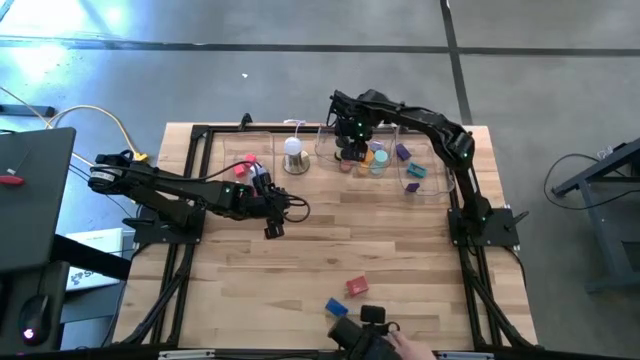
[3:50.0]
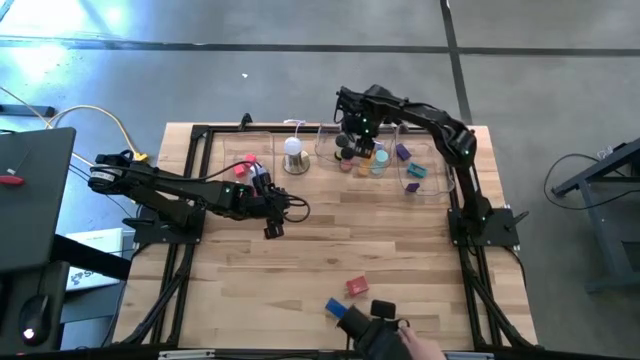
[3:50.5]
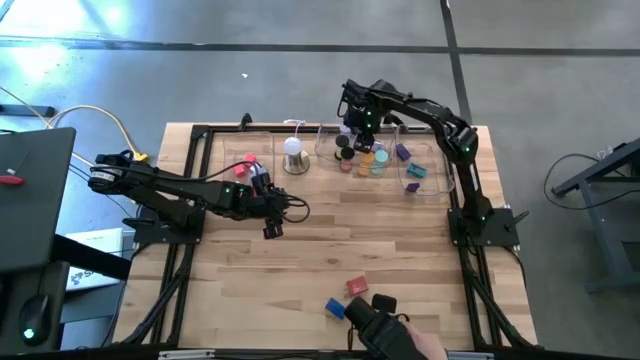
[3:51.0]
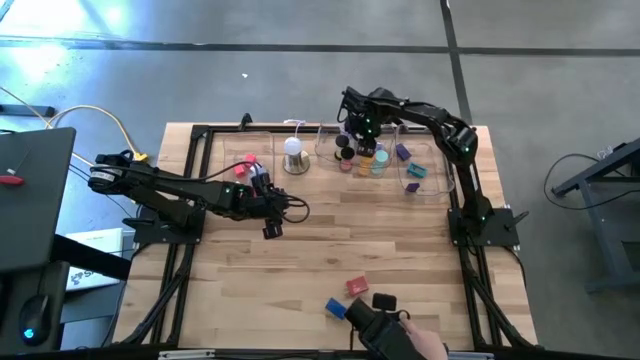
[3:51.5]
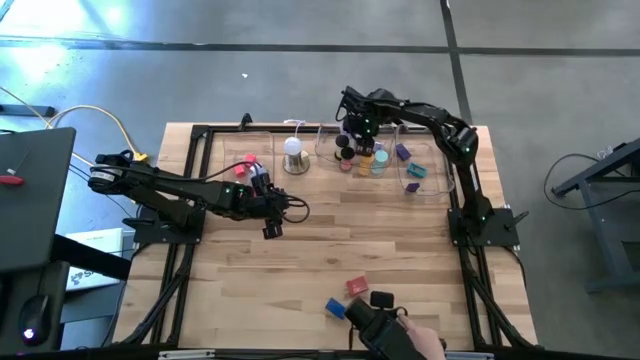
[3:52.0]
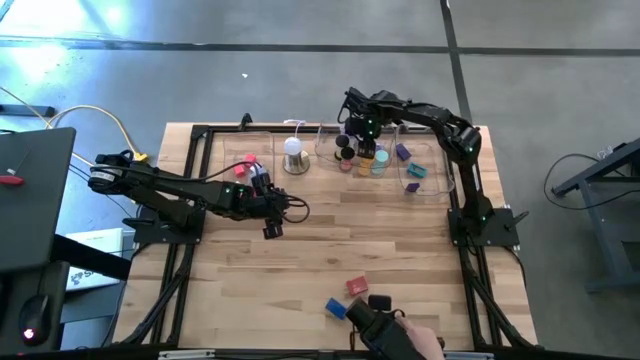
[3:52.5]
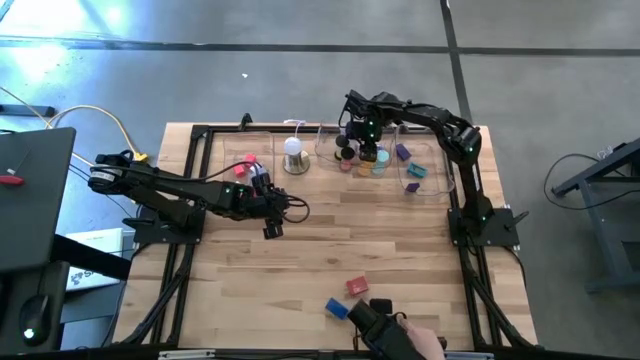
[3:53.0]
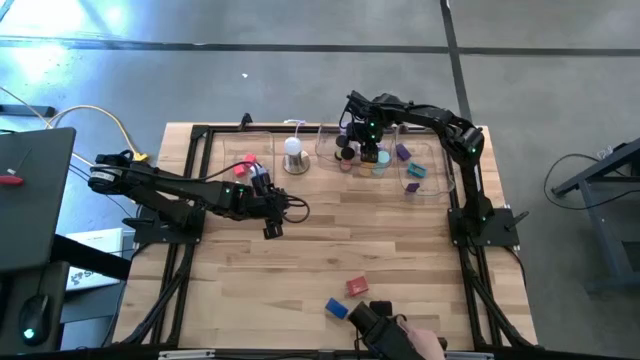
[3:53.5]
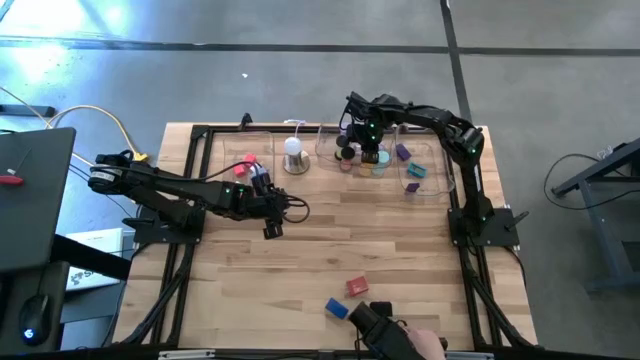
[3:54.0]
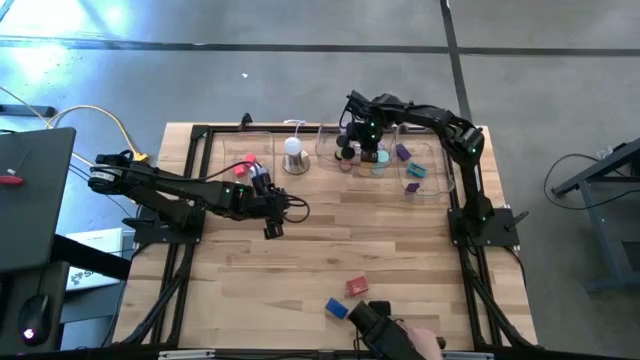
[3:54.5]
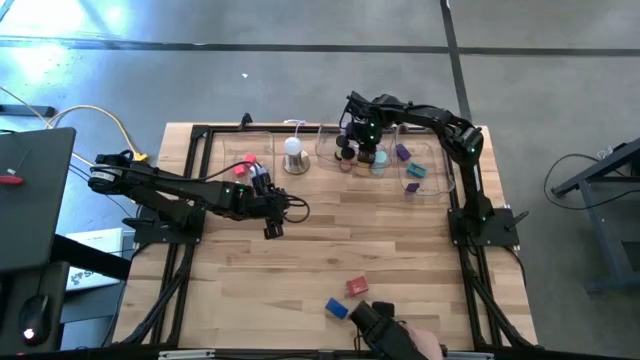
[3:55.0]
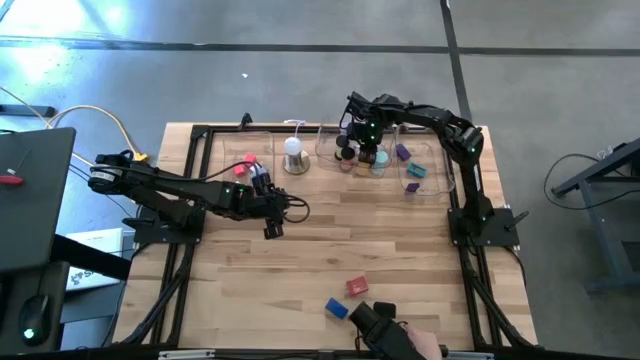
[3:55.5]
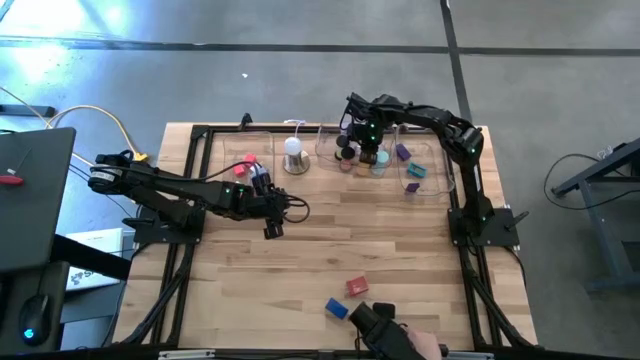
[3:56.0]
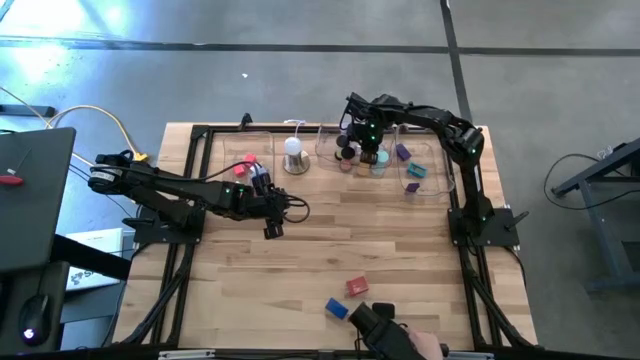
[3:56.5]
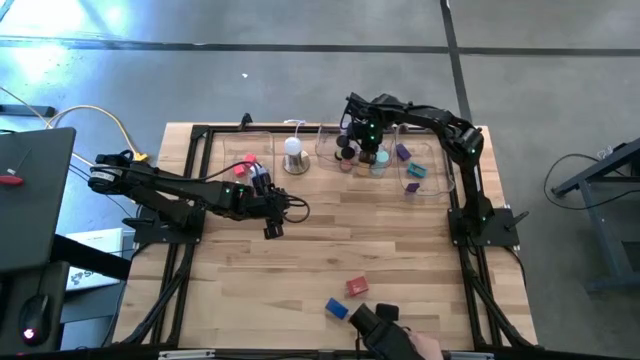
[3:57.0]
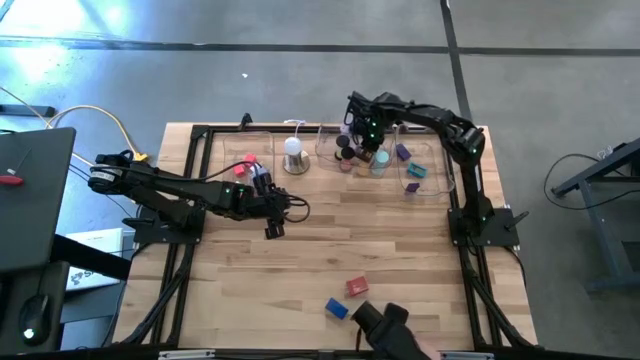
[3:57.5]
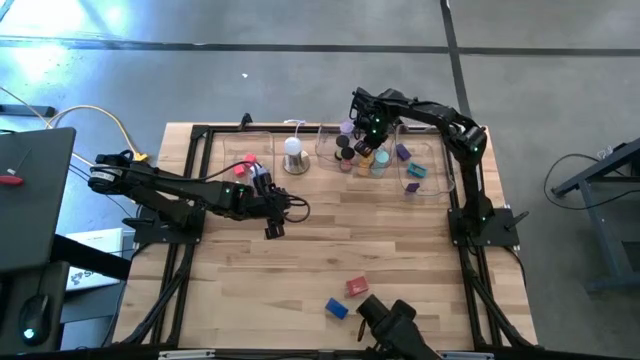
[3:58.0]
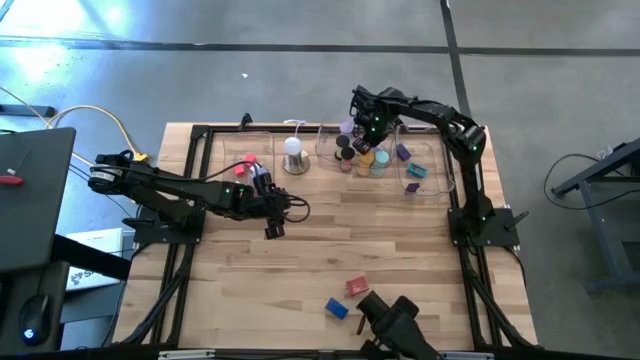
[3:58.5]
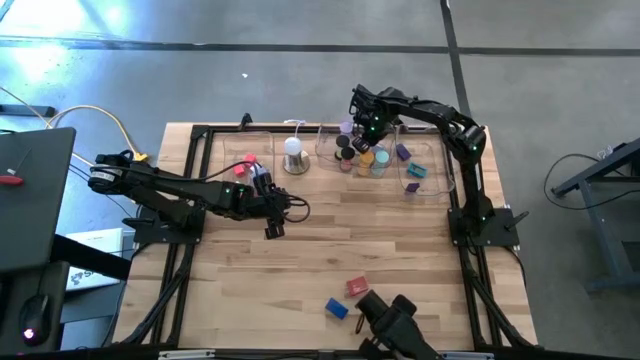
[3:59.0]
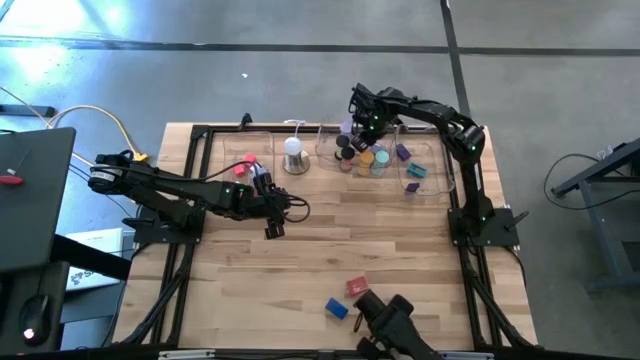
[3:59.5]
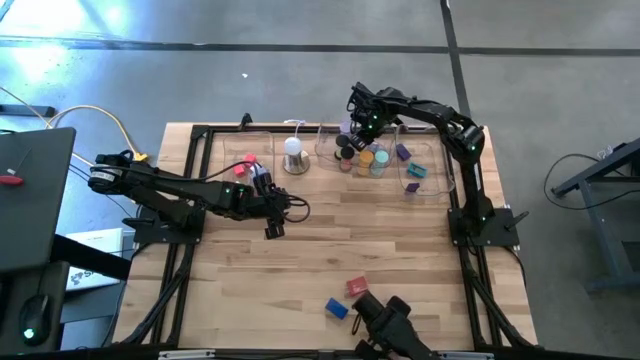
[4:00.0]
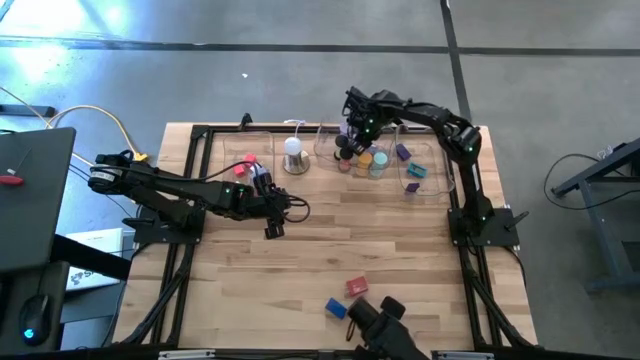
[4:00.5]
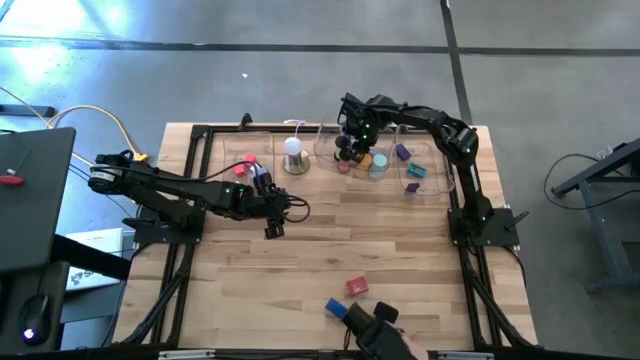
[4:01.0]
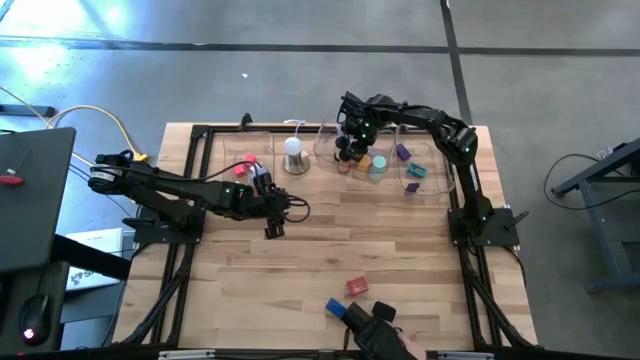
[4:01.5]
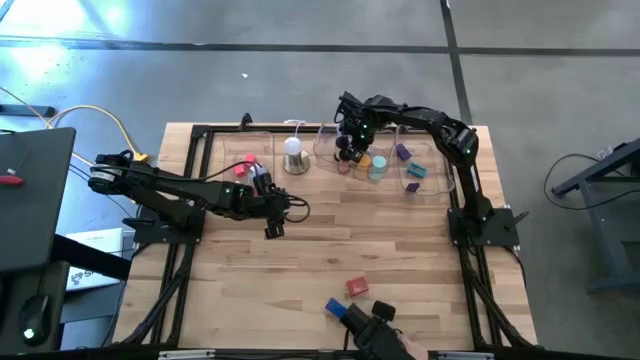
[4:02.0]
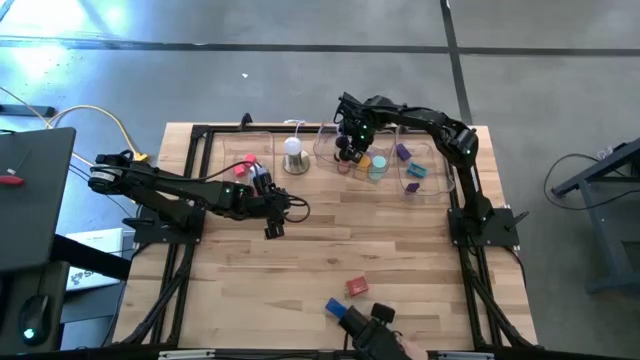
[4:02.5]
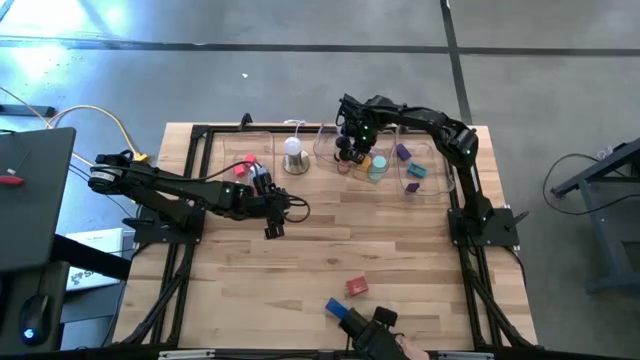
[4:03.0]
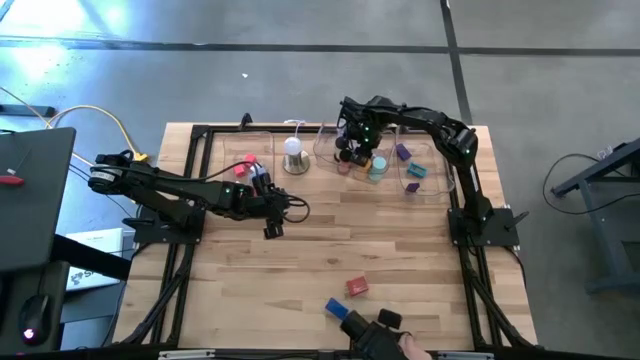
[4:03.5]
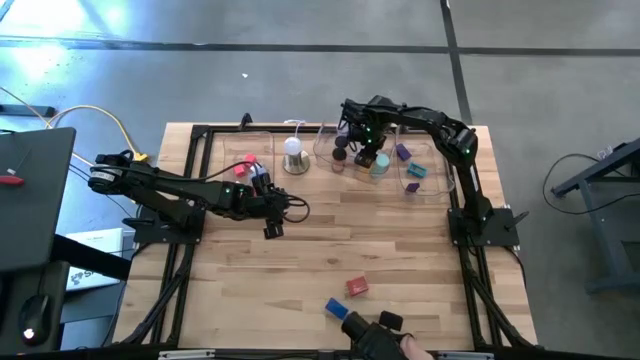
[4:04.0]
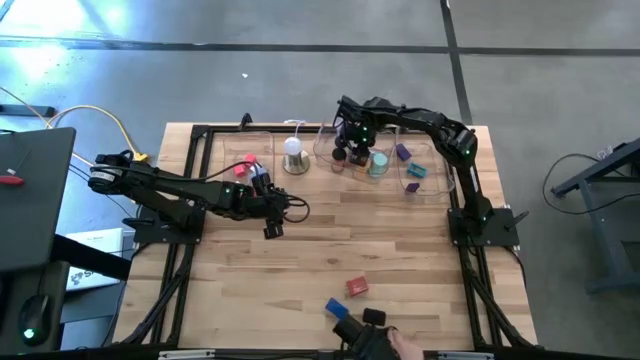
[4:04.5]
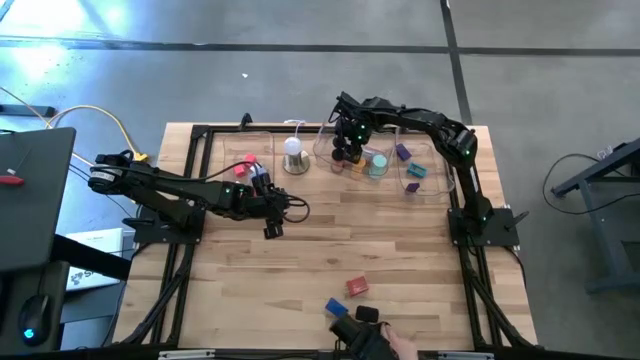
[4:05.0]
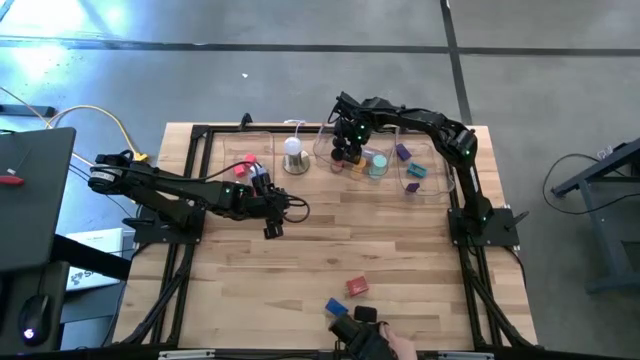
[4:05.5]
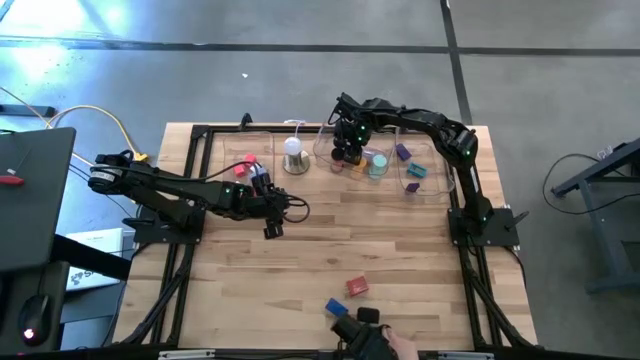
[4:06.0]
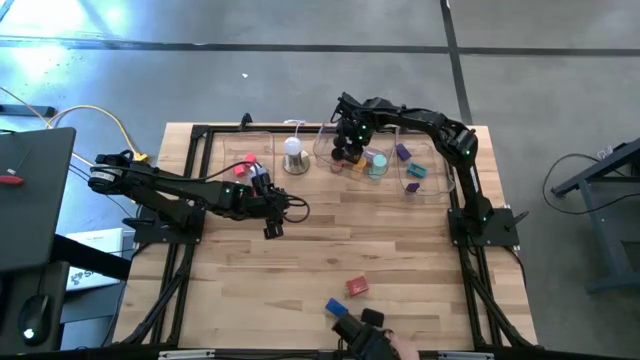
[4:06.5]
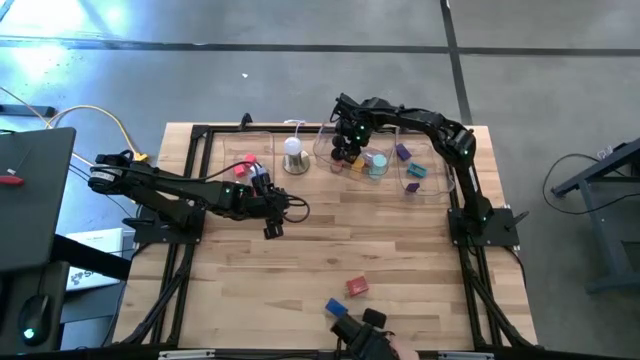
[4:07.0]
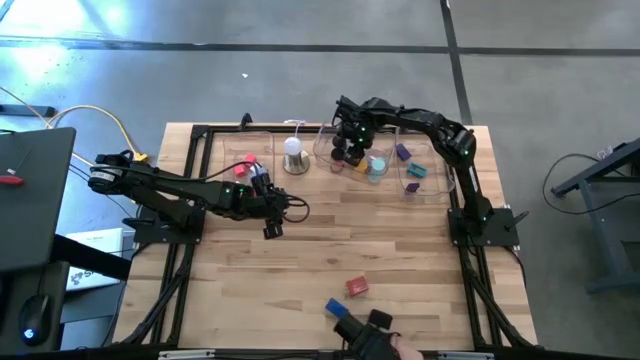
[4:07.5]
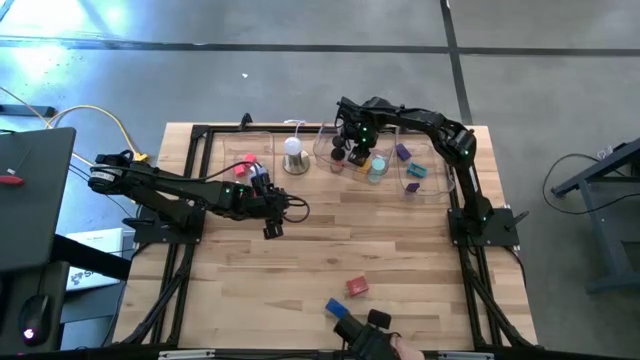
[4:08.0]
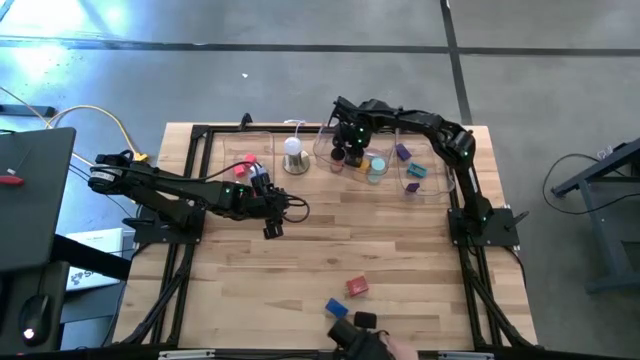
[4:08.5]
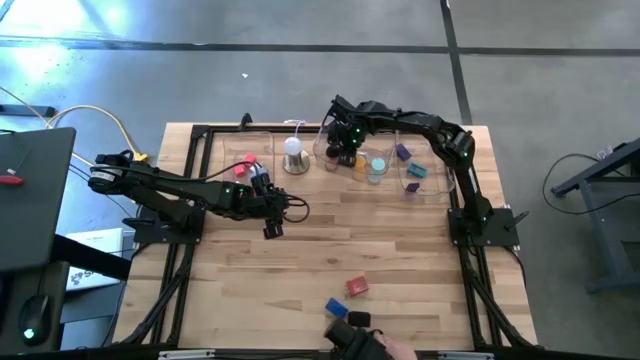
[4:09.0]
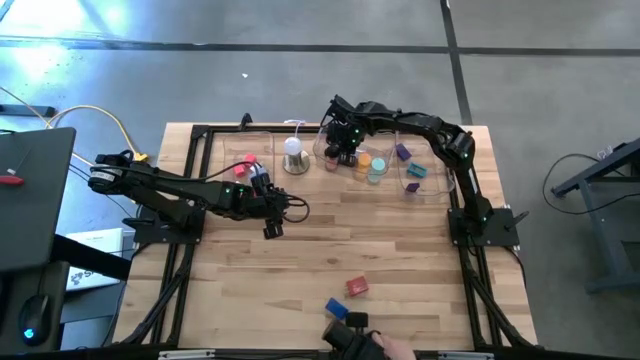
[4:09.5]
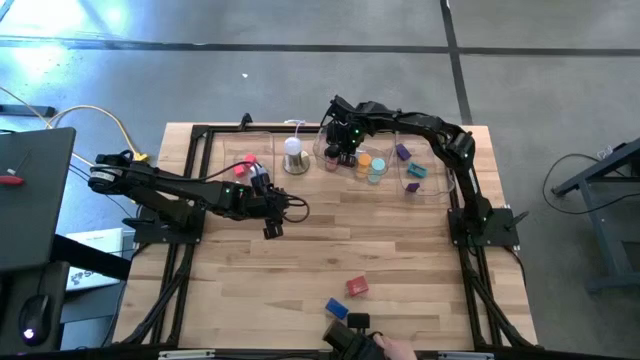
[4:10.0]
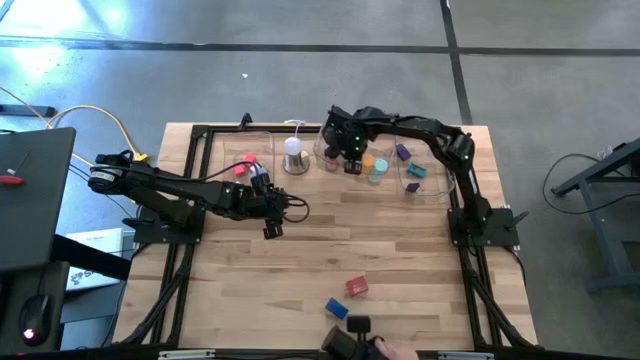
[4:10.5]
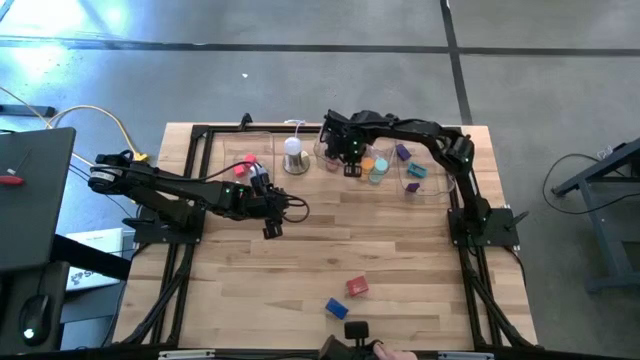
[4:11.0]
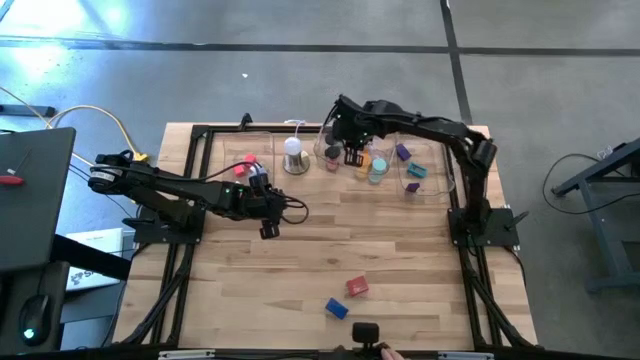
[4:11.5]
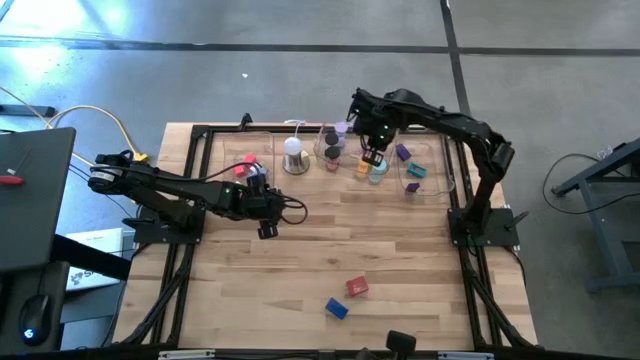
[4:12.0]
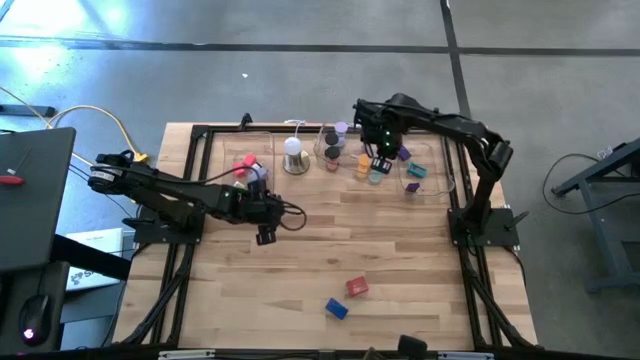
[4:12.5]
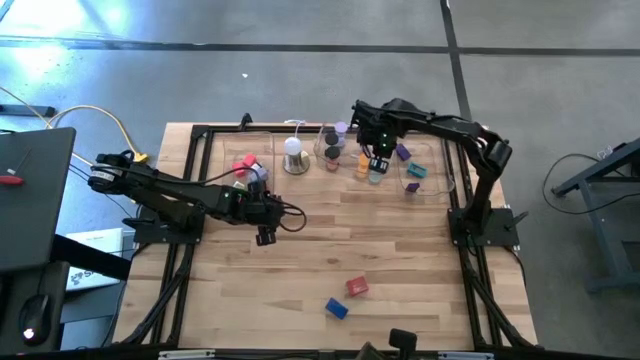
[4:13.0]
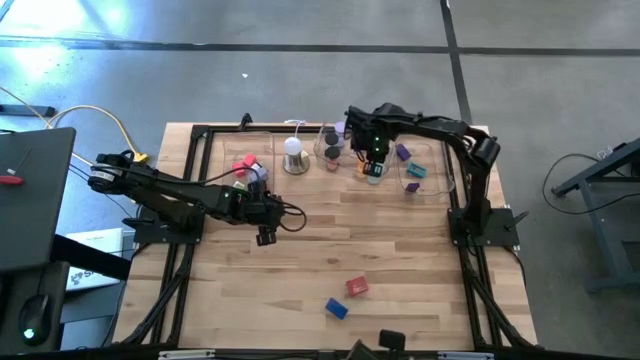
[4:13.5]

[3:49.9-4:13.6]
Task: Pick & Place Office items
Put the purple hourglass into the middle transparent bin
